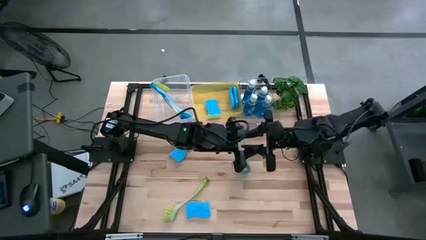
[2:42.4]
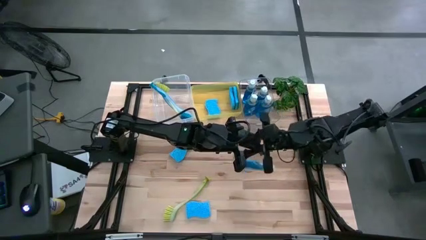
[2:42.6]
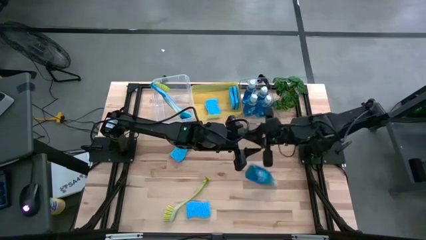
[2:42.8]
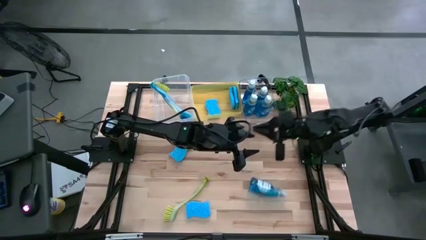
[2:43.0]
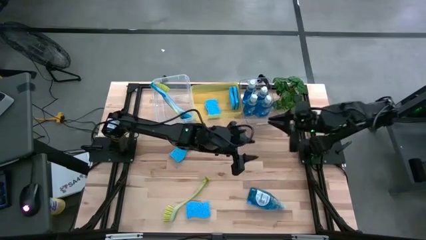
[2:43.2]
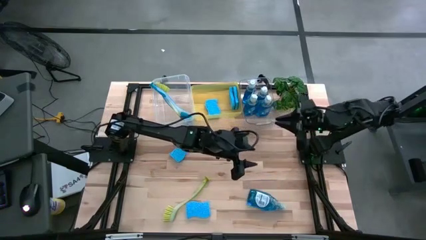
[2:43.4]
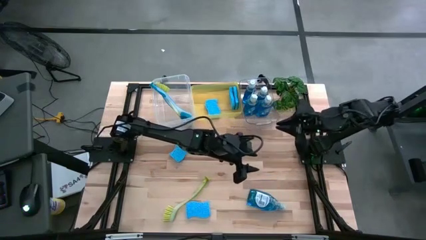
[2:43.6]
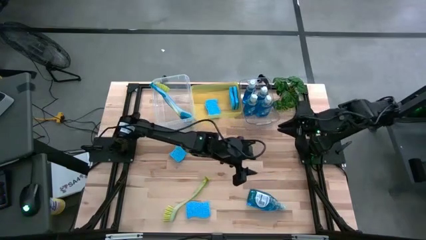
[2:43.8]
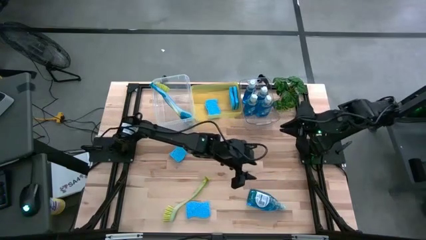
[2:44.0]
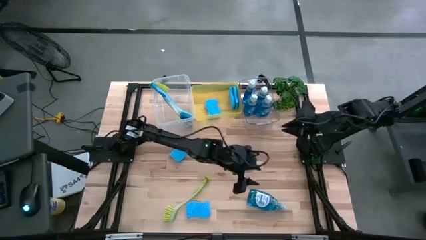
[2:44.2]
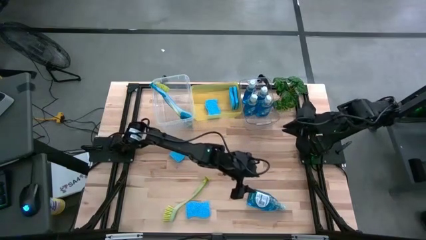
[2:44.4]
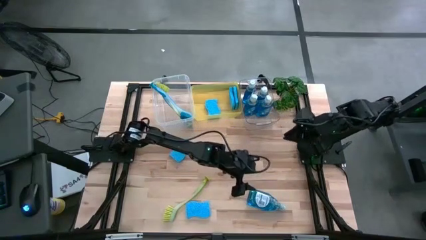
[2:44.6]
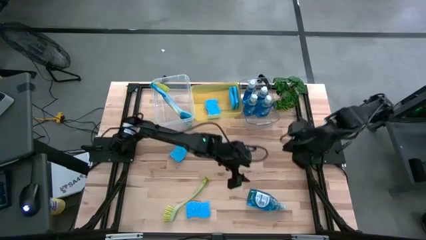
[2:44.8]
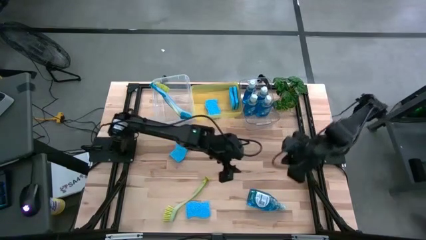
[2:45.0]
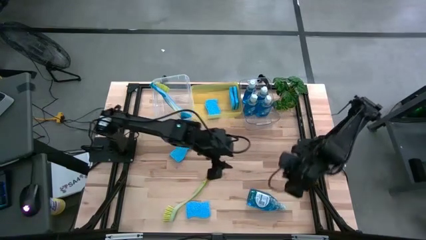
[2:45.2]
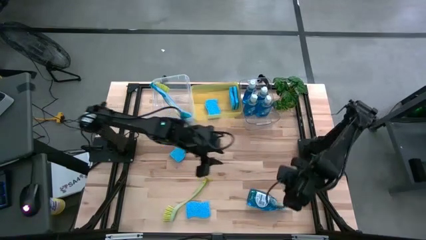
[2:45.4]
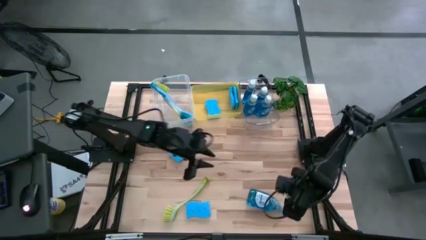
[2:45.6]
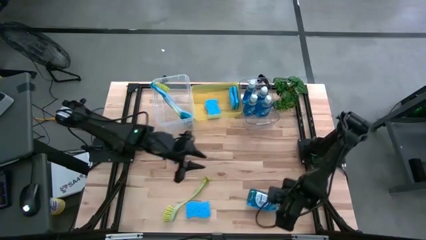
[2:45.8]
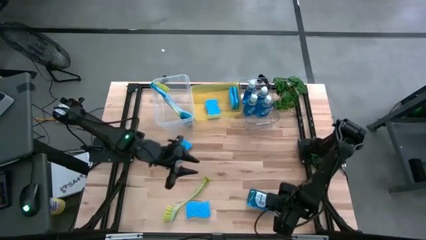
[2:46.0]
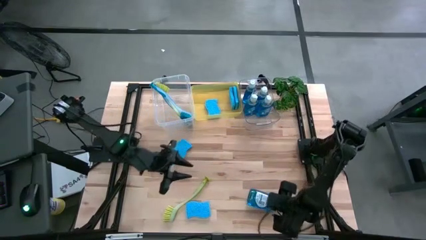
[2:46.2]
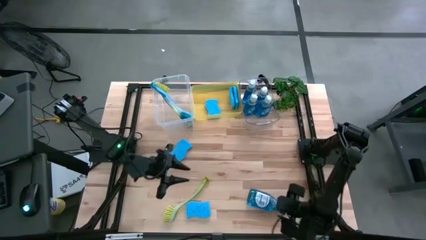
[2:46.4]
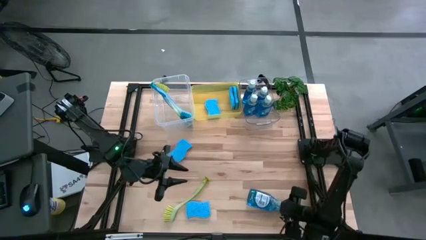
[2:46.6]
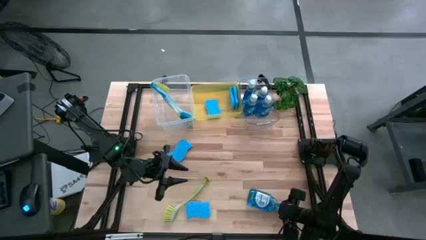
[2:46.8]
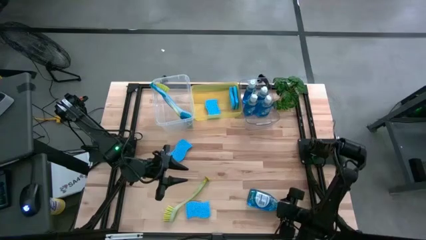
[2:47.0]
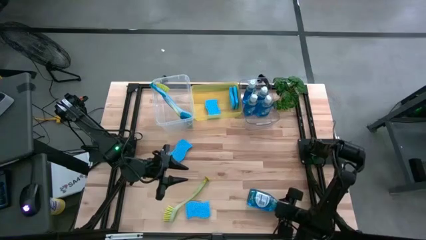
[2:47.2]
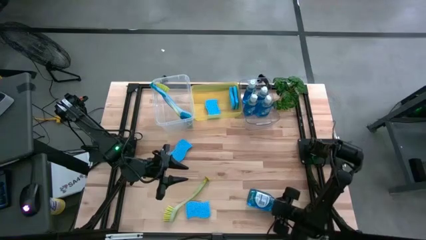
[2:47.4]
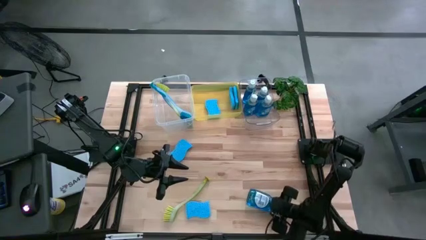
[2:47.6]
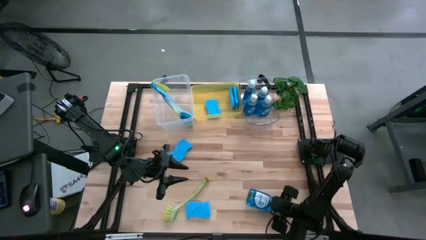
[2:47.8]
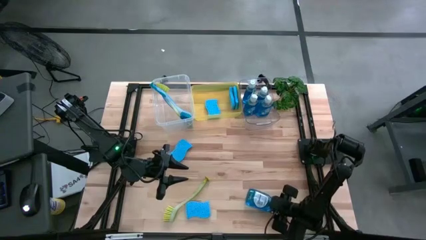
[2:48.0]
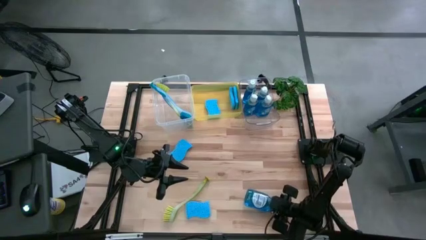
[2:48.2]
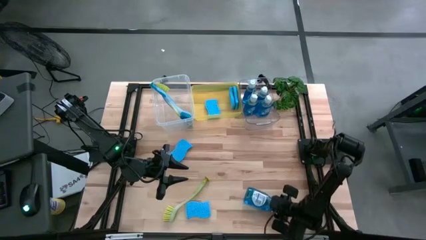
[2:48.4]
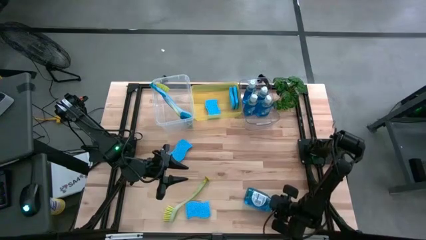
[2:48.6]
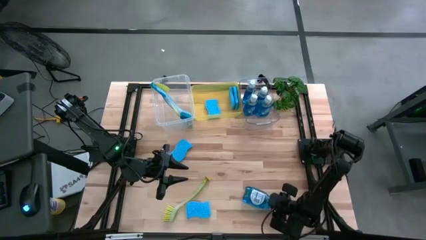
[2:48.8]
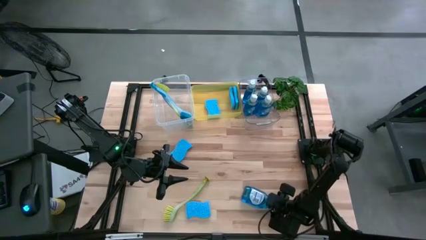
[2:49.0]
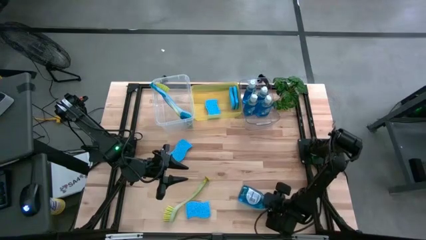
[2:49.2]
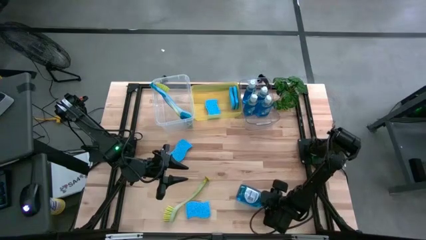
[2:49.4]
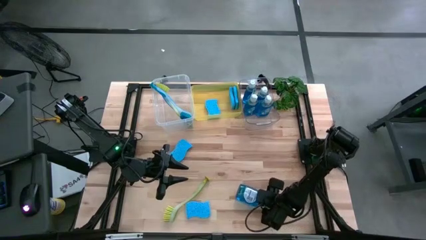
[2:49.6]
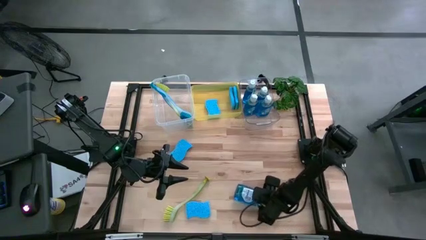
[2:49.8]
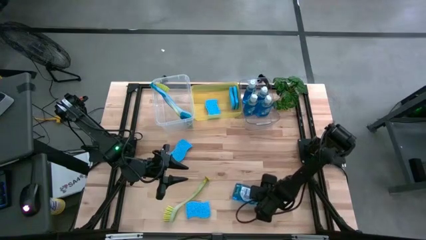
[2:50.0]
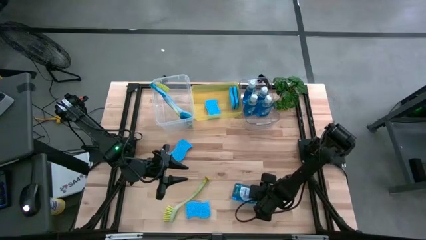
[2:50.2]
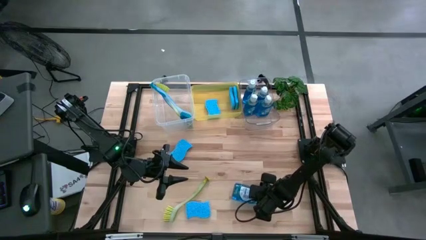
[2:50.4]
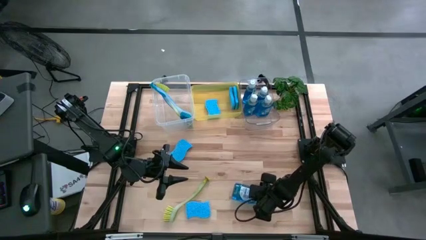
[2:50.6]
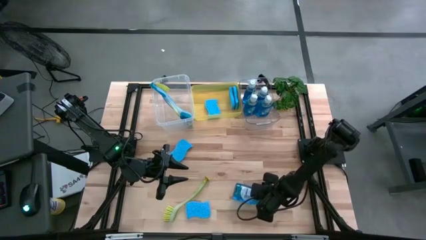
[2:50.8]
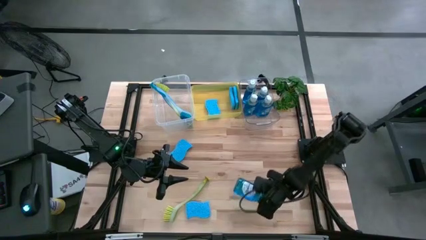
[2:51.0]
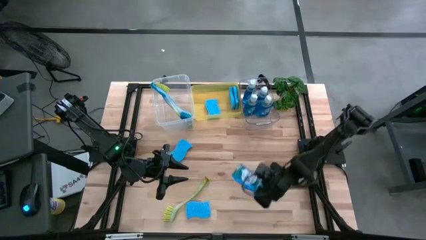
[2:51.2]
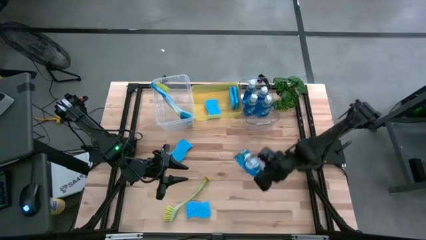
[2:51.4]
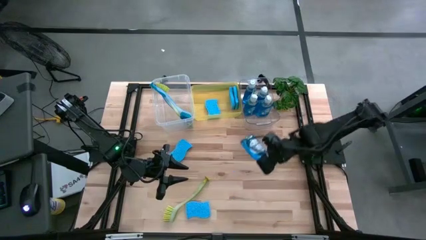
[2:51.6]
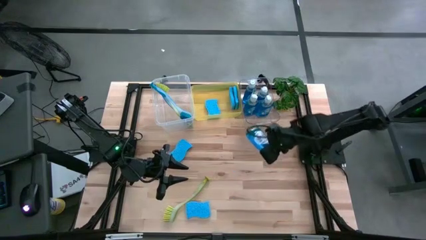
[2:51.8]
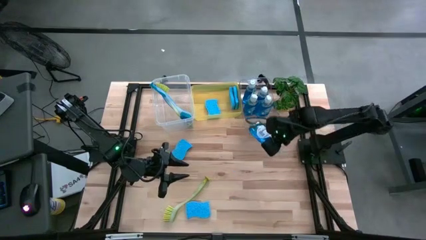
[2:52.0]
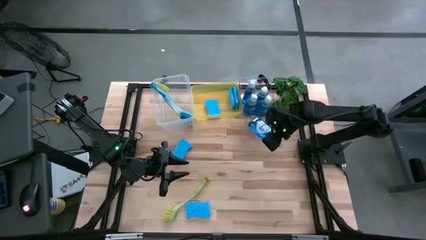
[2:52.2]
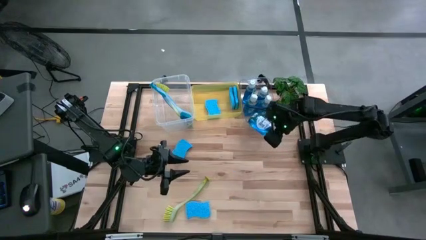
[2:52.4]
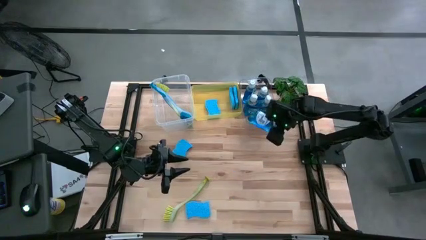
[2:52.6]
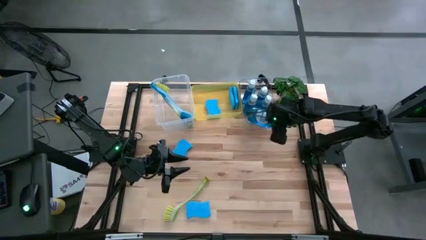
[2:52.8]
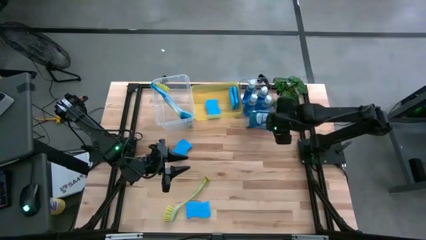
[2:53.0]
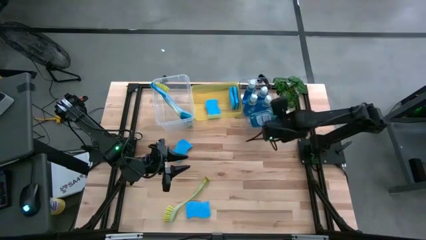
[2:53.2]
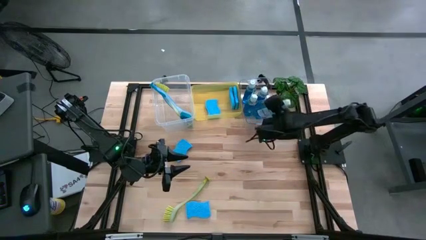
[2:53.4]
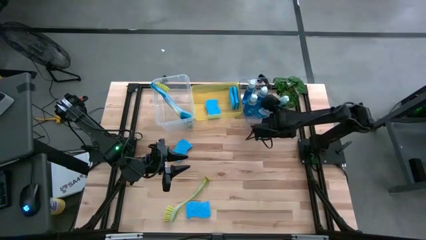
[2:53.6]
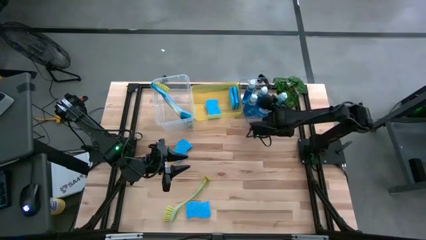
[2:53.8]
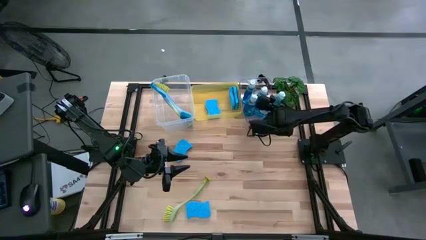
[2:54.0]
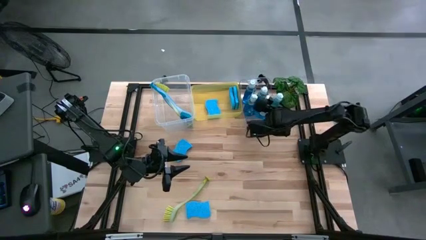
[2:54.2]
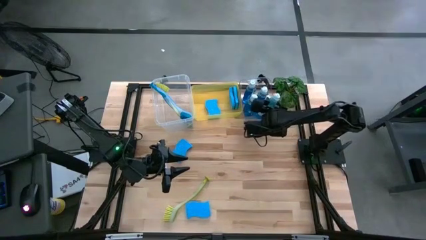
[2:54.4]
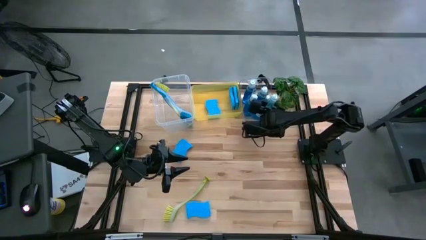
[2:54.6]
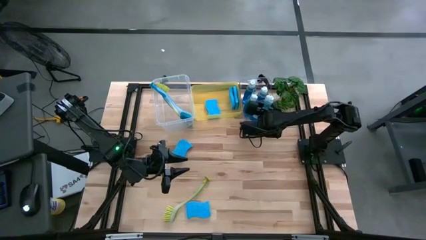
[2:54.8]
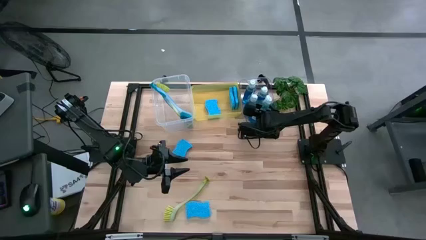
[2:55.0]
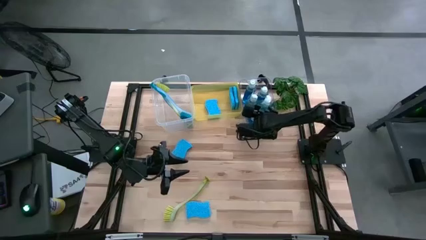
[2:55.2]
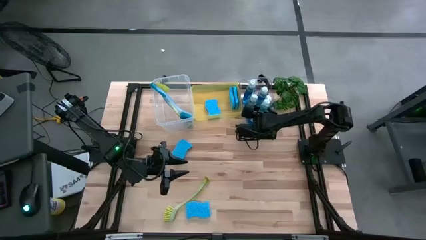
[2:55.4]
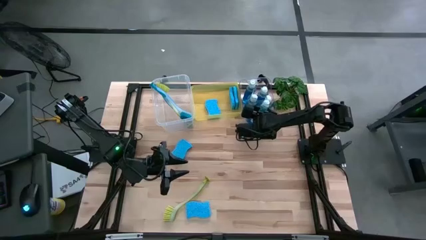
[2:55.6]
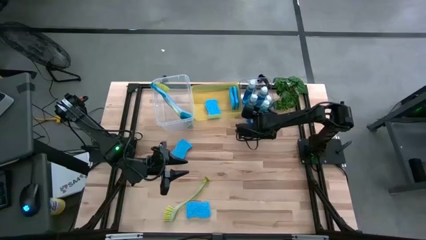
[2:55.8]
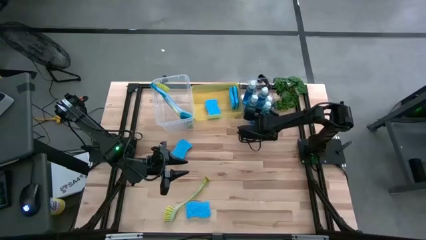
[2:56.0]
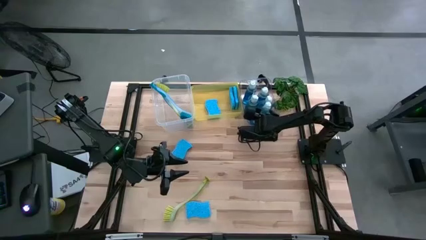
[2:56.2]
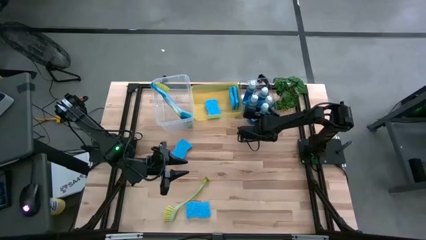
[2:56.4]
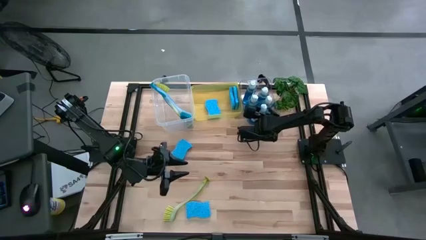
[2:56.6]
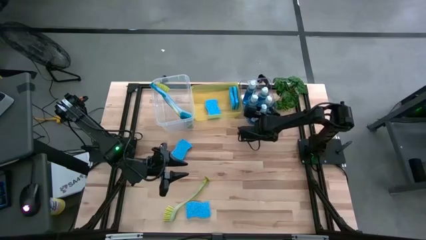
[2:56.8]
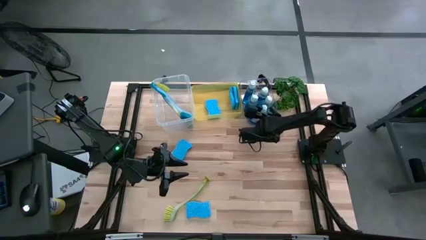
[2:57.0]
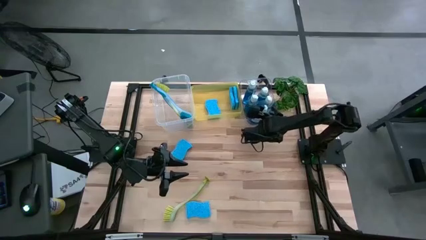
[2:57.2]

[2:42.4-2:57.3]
Task: Pick & Place Kitchen Sink Supplies
Put the blue dishwasher liquid into the transparent bin

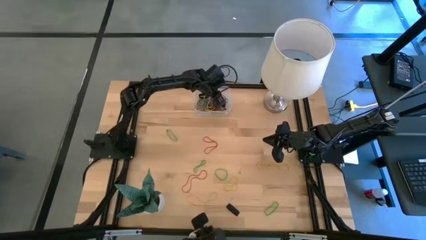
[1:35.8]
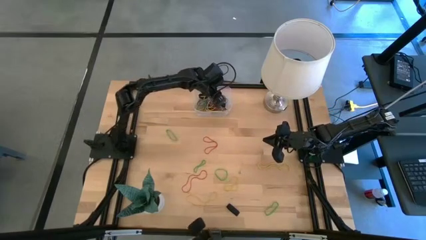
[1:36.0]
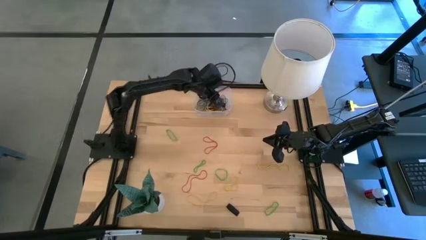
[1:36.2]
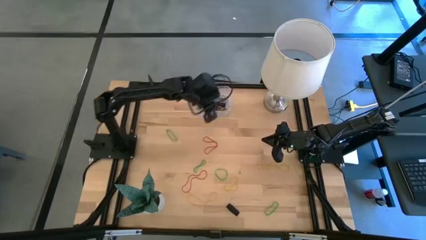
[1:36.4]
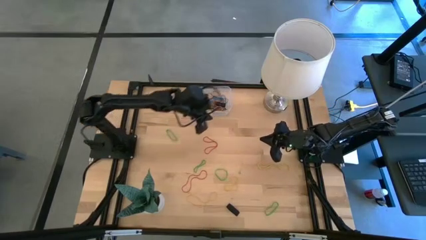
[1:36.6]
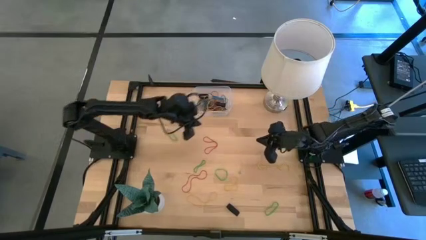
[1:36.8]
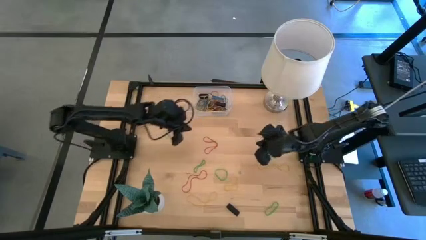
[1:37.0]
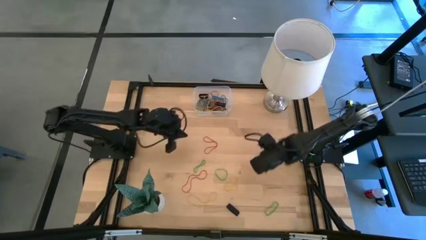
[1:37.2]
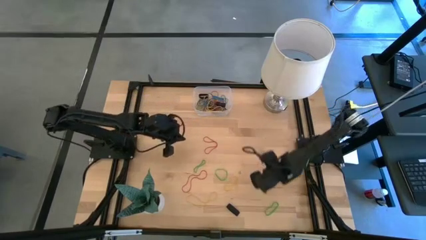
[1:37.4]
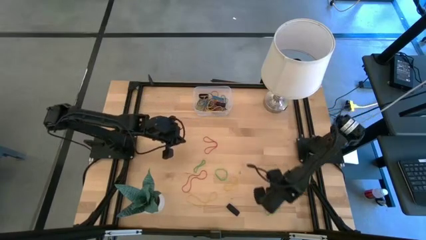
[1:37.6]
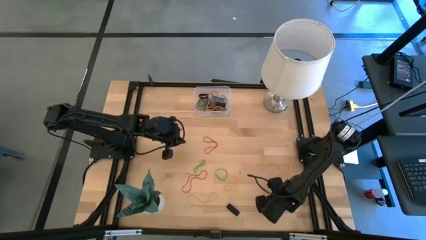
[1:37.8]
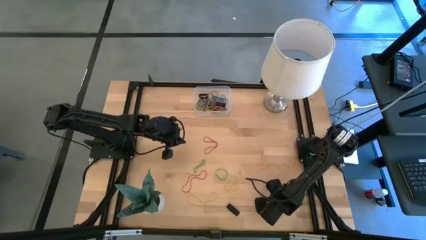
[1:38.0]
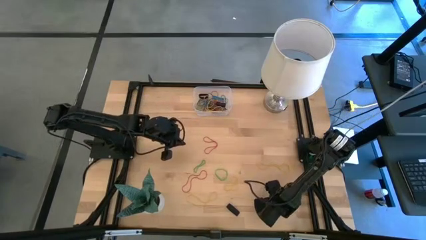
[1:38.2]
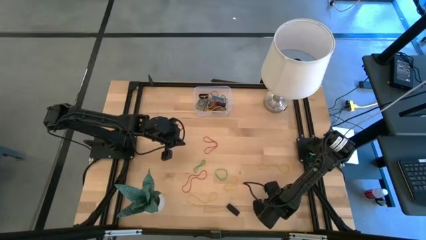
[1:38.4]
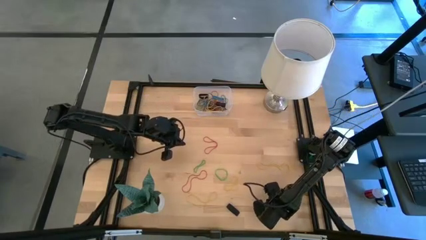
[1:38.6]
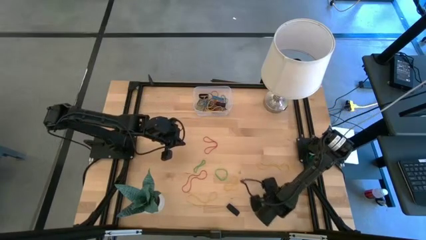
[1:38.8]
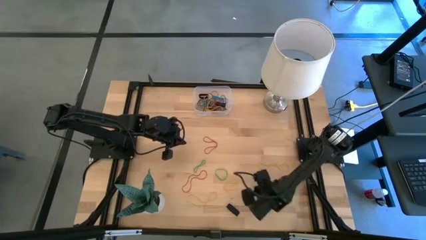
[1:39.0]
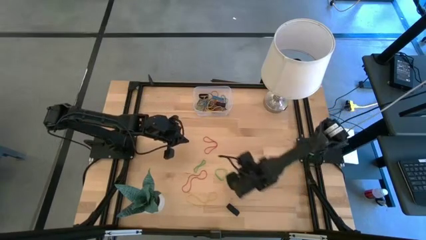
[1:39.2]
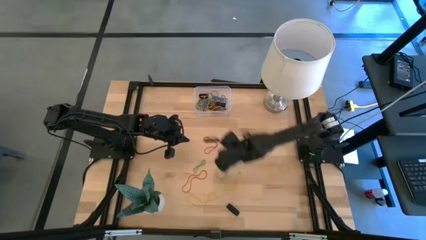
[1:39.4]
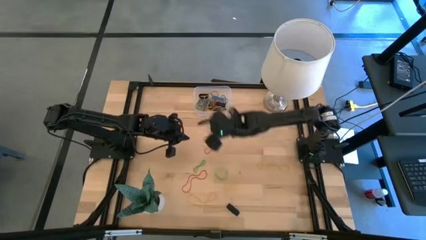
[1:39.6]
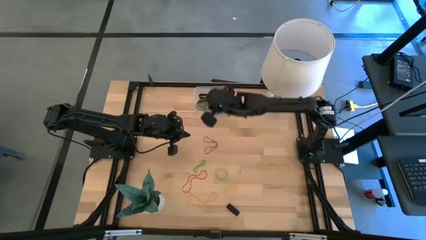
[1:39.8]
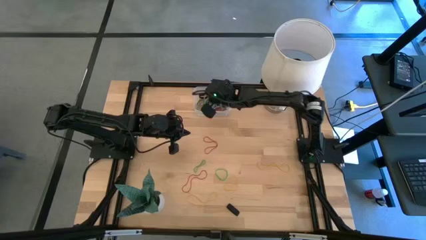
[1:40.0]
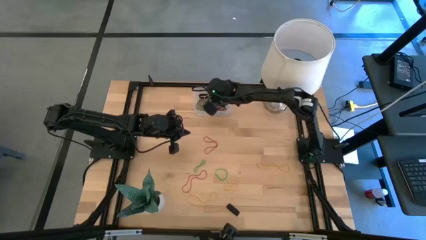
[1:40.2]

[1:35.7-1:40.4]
Task: Pick and place rubber bands into bin
Put the green rubber band into the transparent bin
